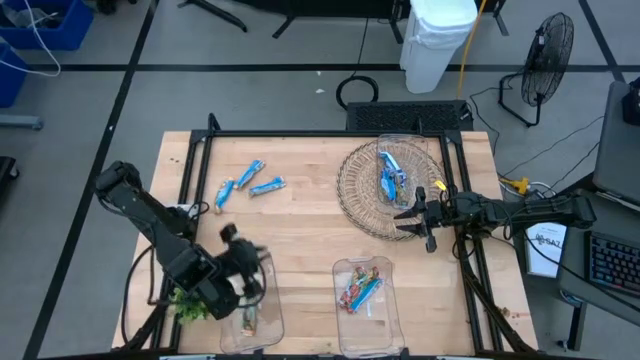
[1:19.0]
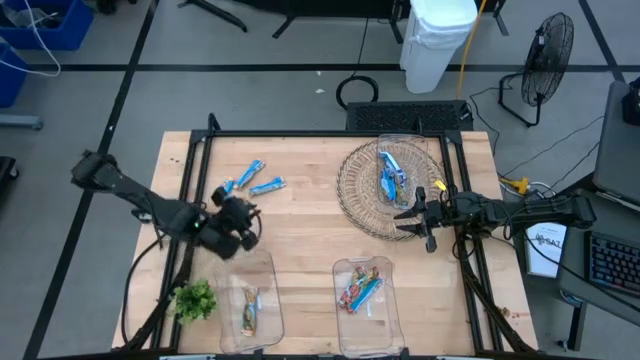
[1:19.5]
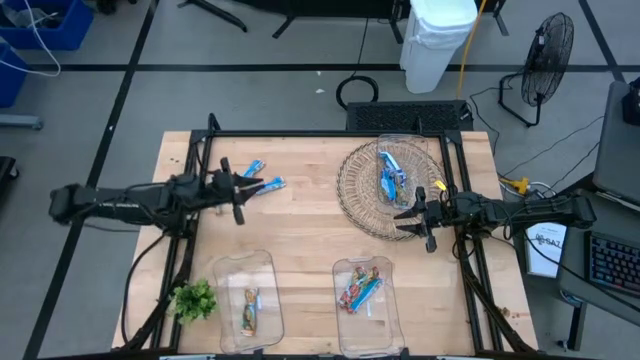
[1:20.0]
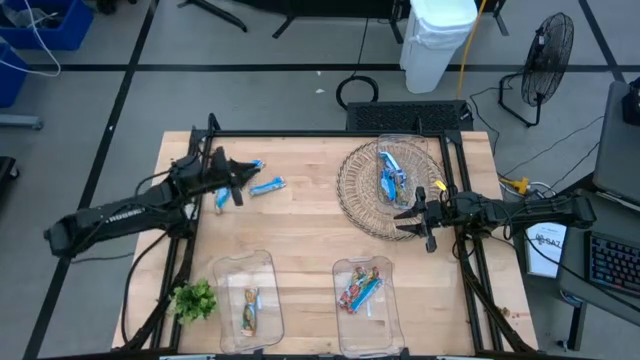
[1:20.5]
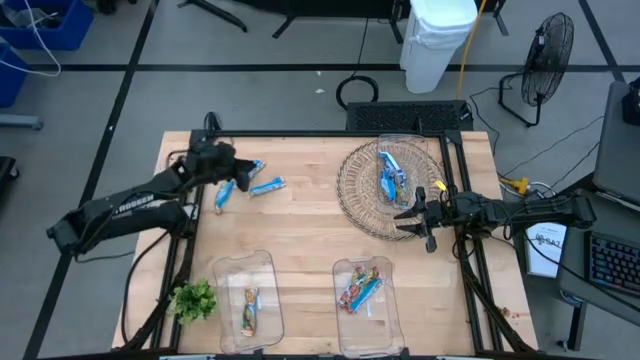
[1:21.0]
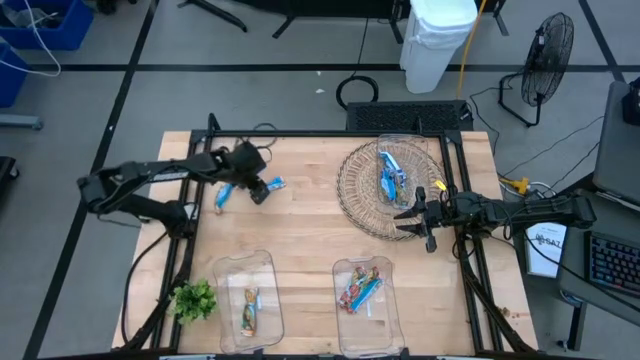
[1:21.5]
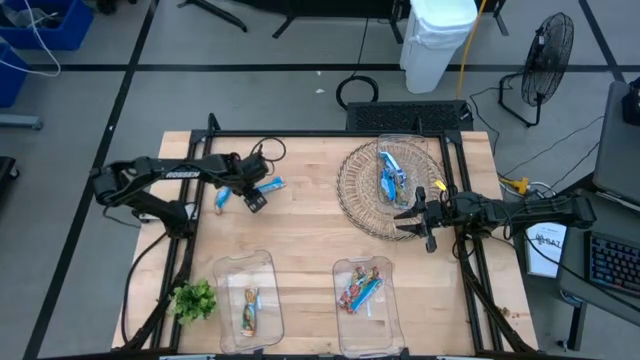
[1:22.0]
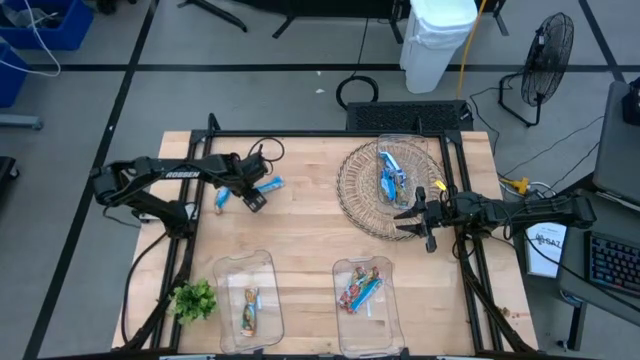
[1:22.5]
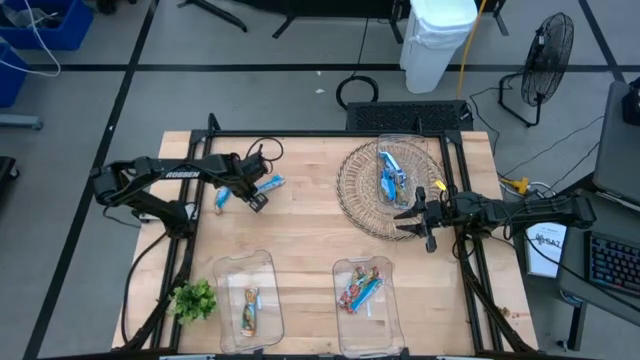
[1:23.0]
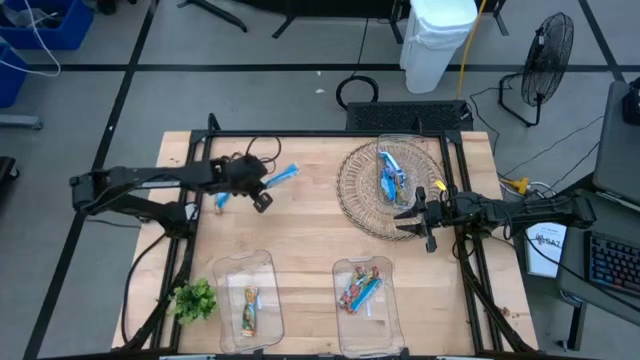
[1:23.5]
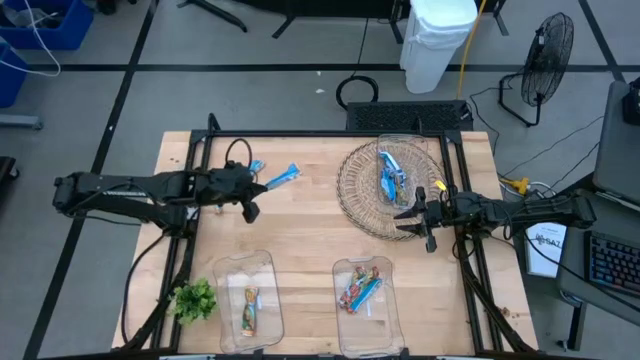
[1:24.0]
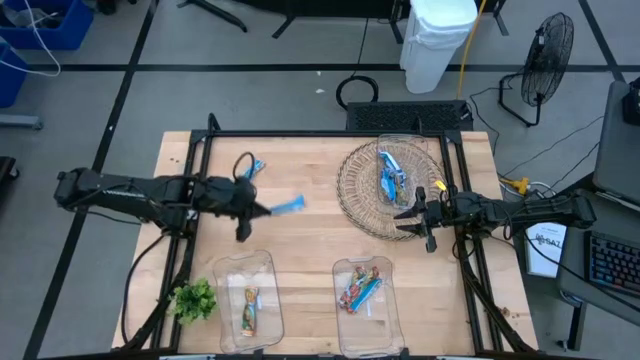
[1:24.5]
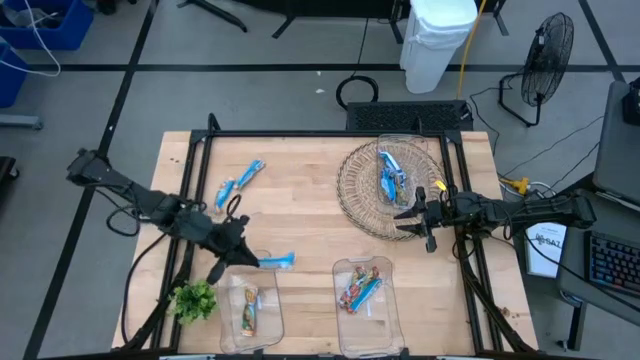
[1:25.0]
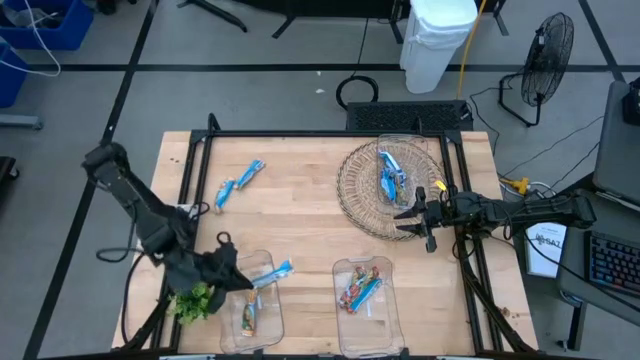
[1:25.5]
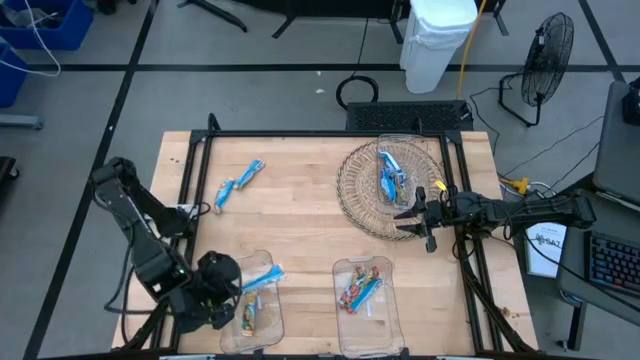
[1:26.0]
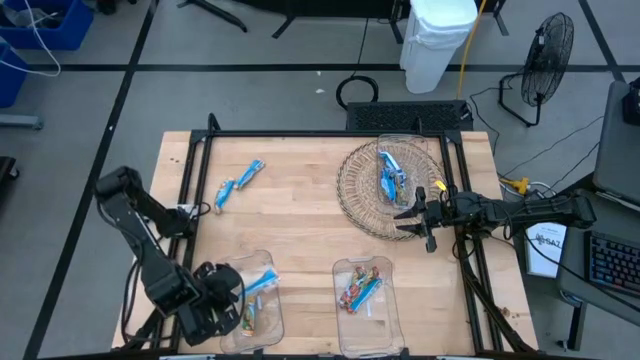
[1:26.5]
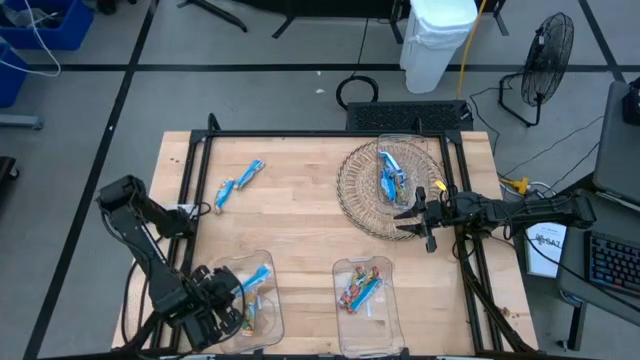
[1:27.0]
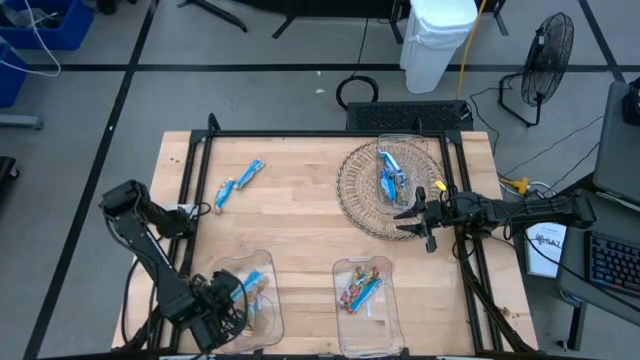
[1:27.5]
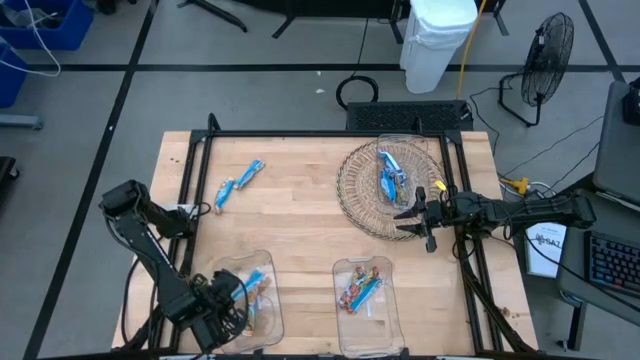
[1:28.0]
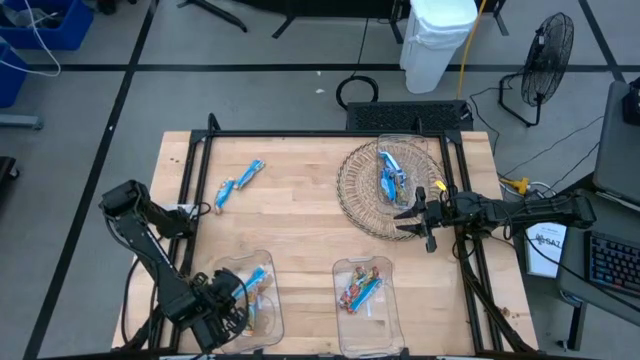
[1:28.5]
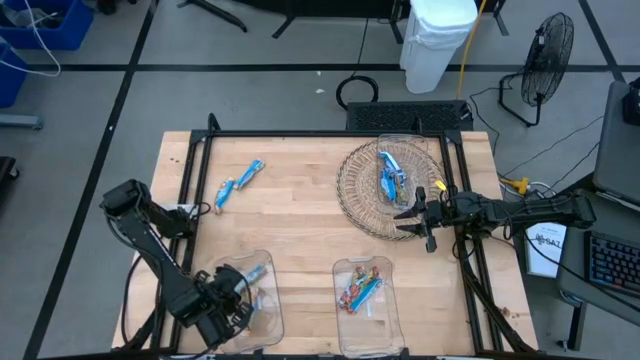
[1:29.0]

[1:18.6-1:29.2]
Task: Pick and place Granola Bars by type
Put the orange granola bar into the bottom left transparent bin

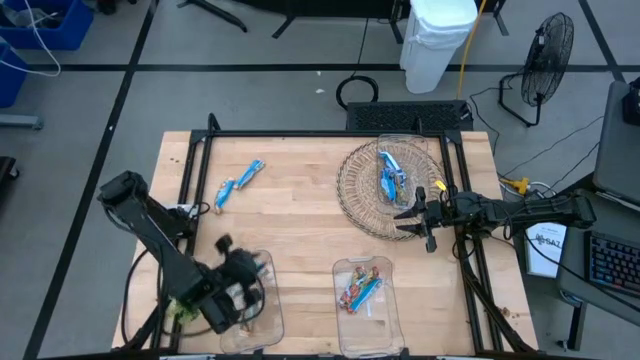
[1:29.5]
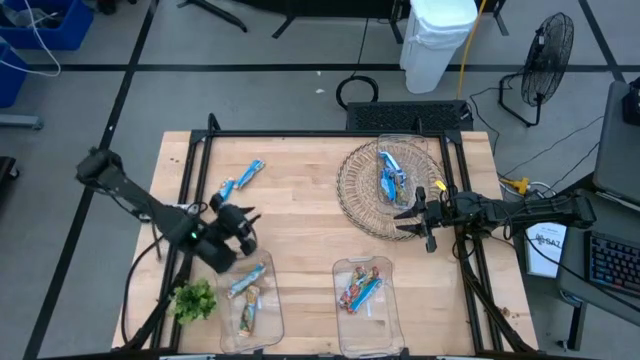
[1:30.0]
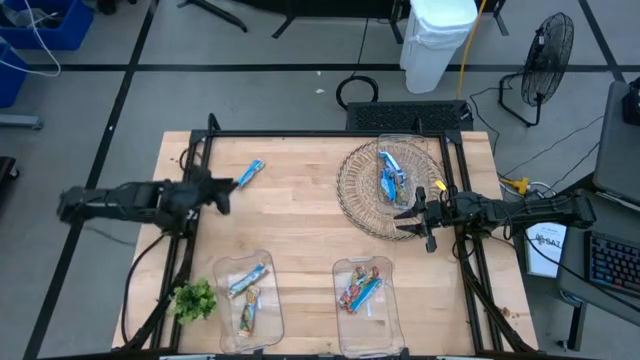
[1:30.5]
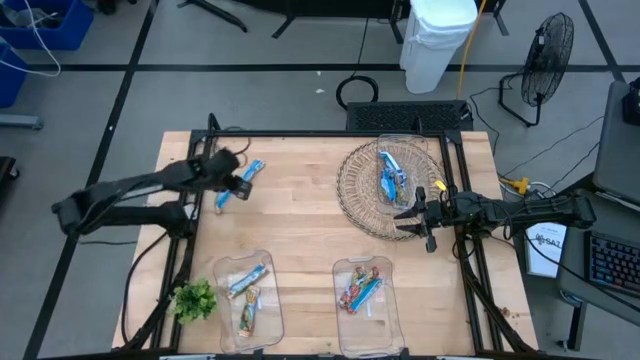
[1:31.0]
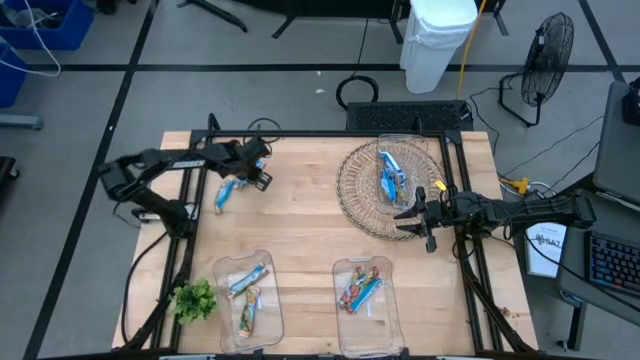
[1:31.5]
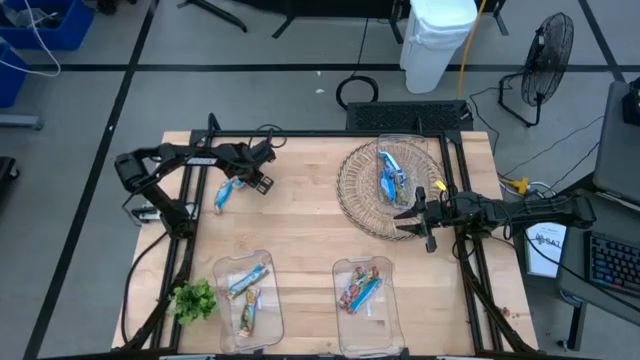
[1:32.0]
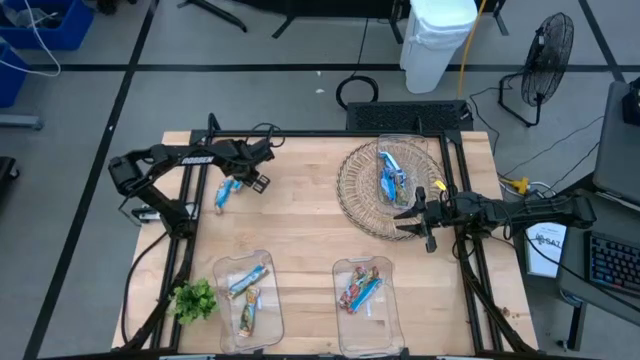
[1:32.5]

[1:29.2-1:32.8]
Put the orange granola bar into the bottom left transparent bin

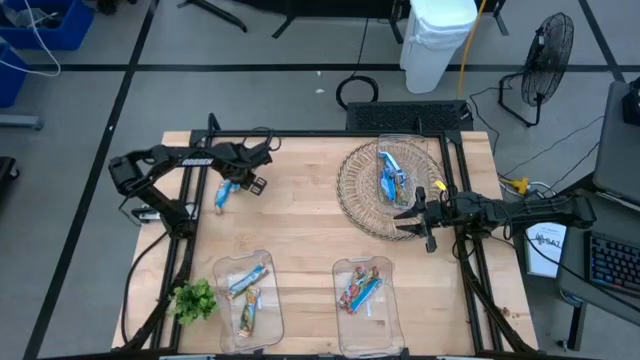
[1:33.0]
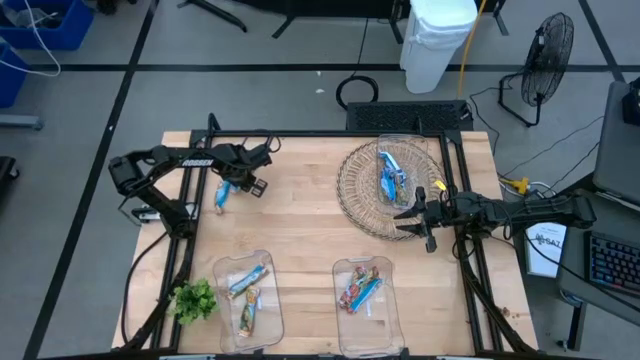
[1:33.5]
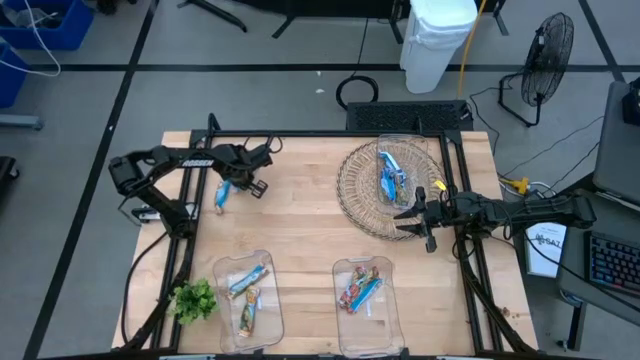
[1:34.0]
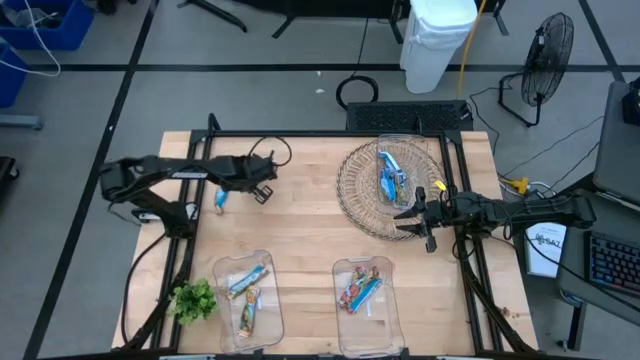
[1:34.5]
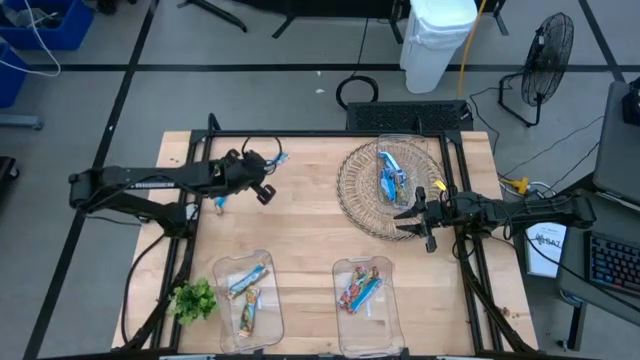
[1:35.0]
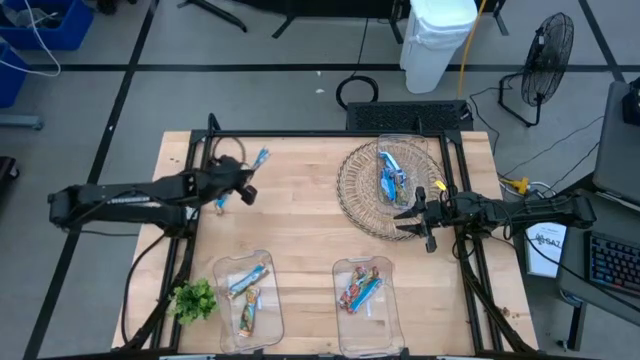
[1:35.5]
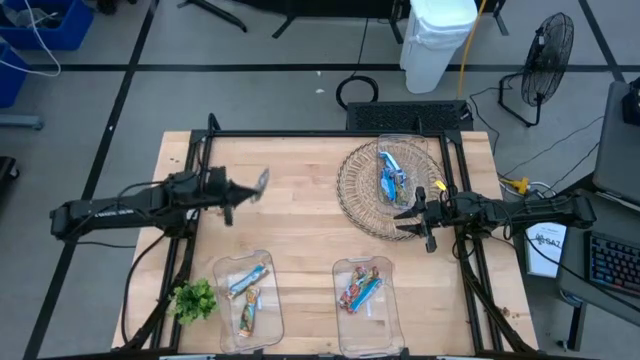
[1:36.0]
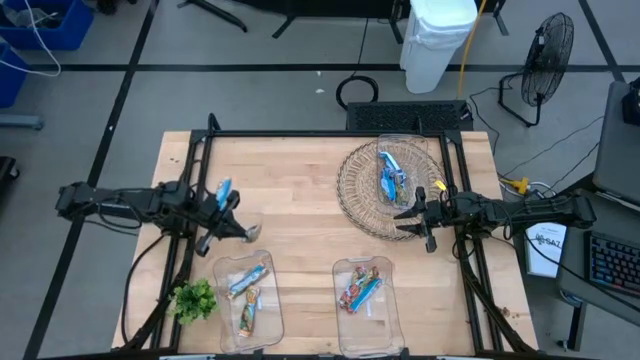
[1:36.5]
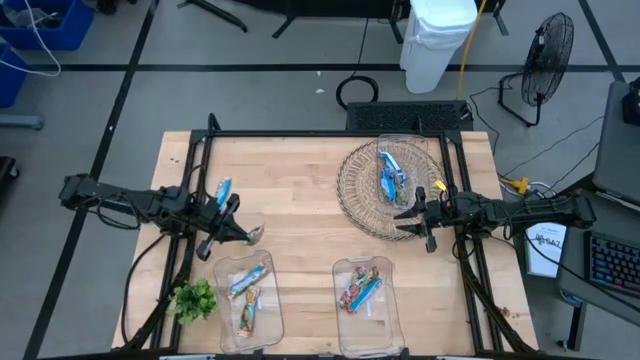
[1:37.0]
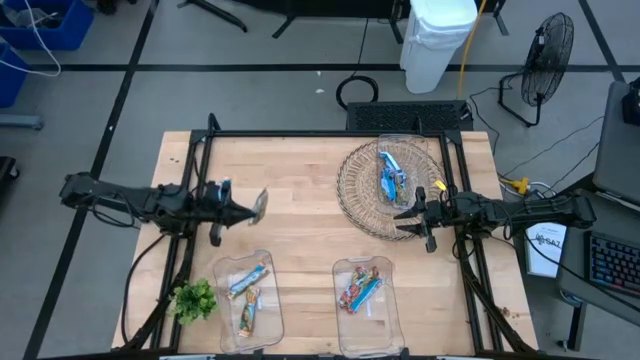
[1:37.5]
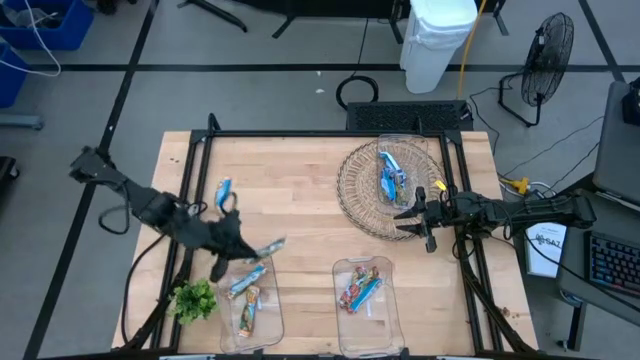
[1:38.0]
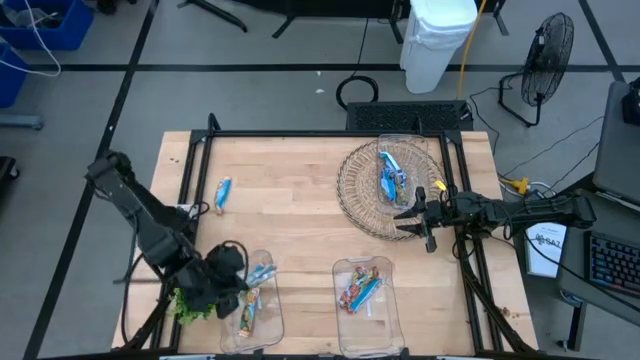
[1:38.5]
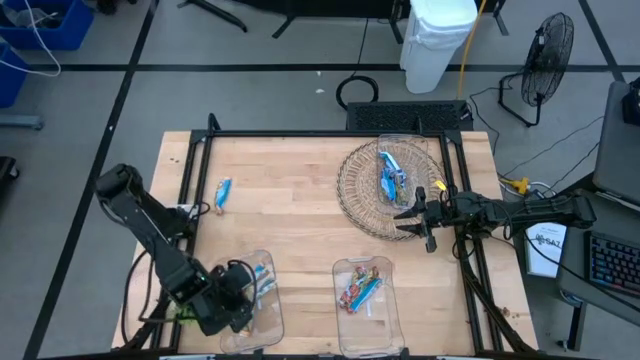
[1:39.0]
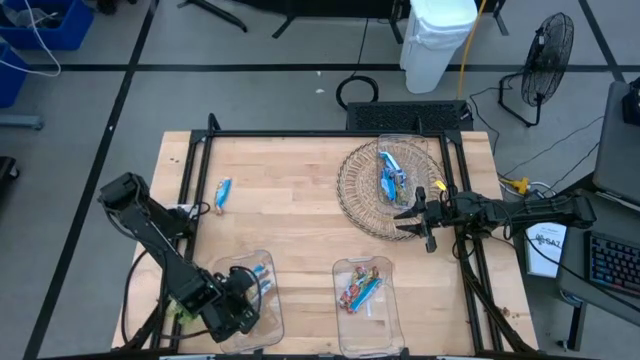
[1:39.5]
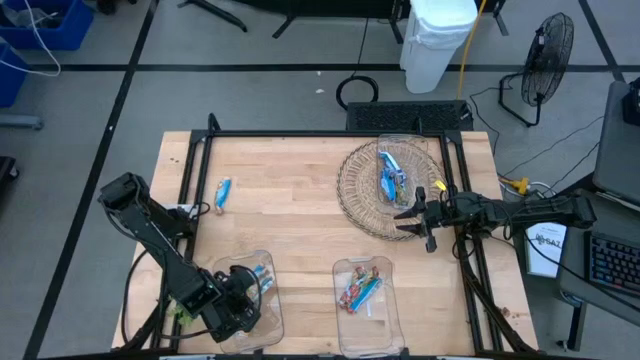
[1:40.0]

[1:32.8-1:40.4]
Put the orange granola bar into the bottom left transparent bin

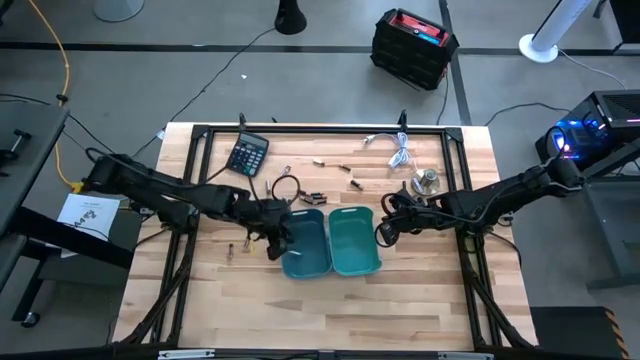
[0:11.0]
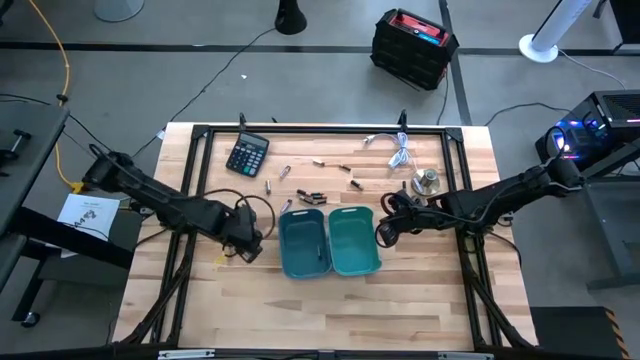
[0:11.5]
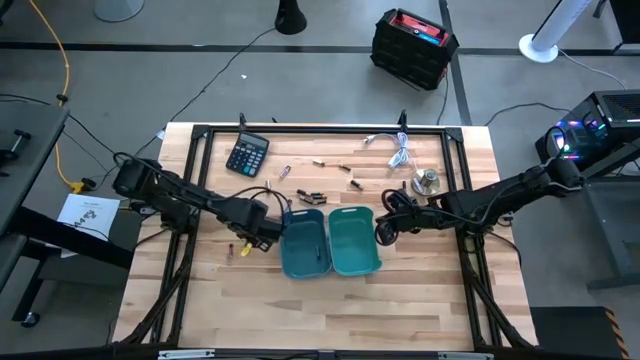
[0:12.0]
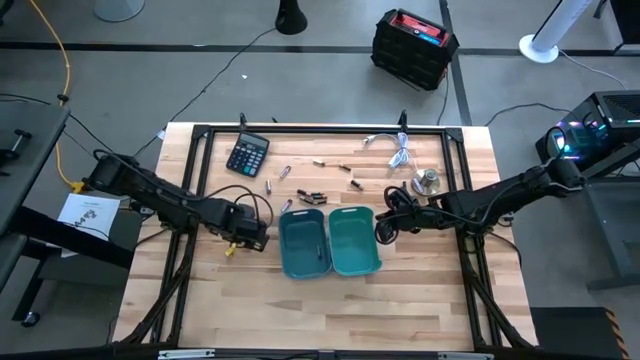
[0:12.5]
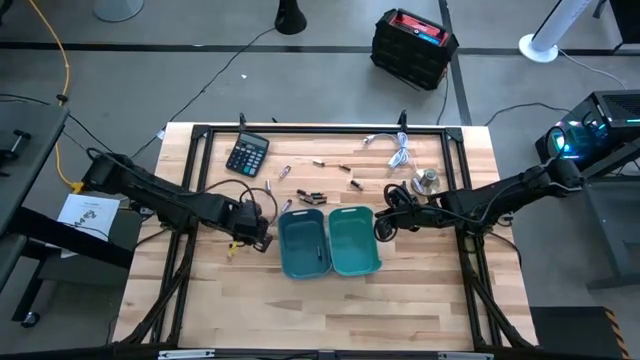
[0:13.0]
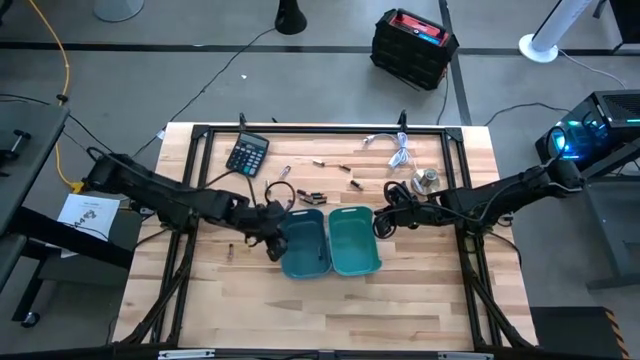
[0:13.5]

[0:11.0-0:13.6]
Task: Sort batteries
Put the silver battery into the blue bin
